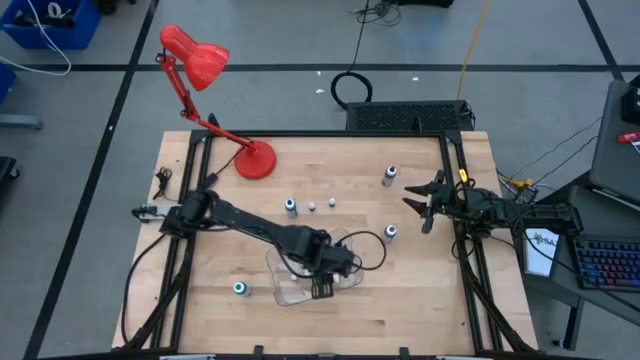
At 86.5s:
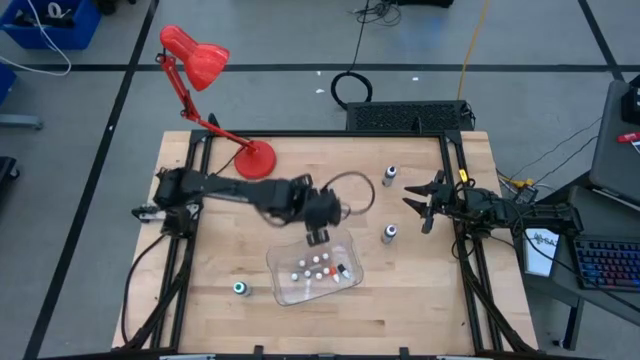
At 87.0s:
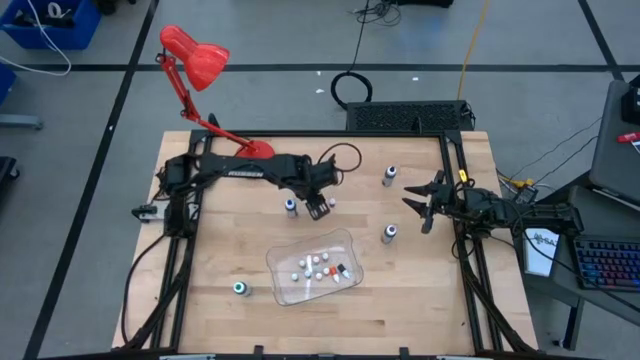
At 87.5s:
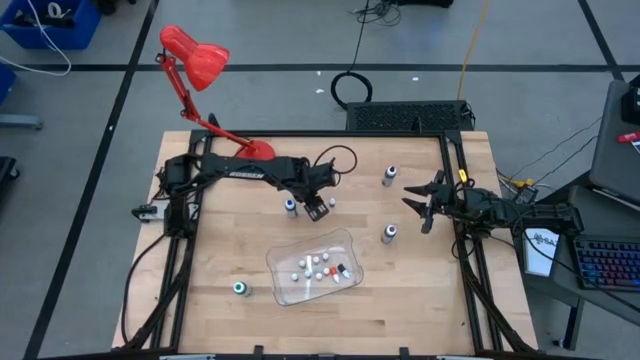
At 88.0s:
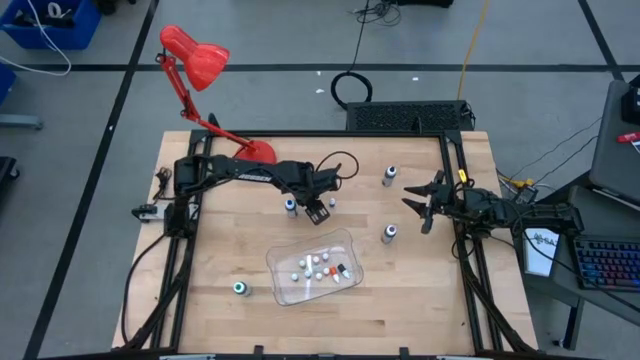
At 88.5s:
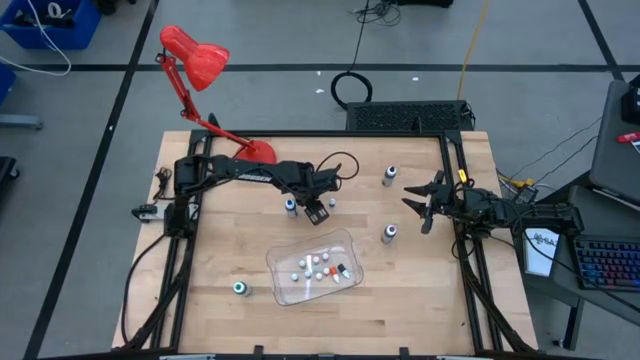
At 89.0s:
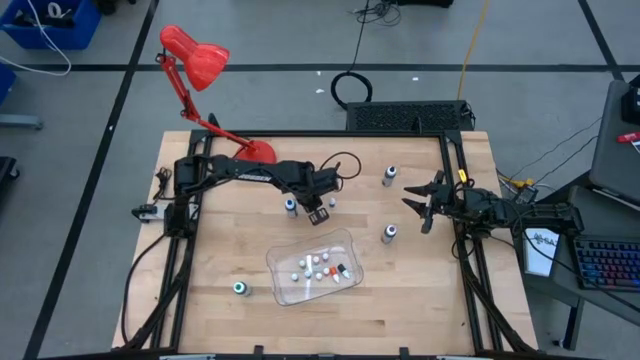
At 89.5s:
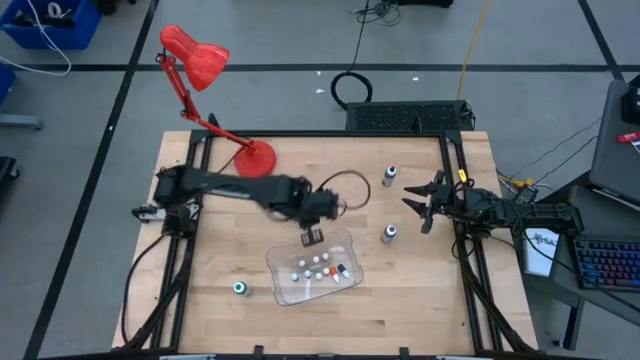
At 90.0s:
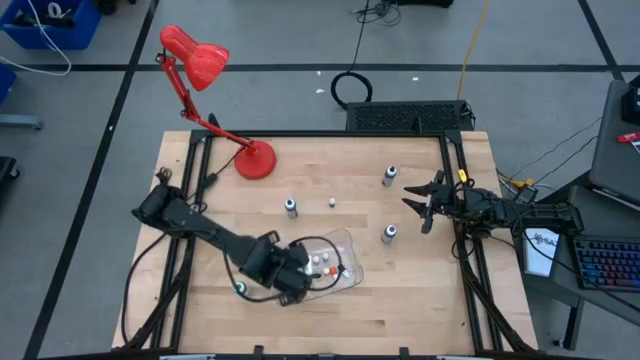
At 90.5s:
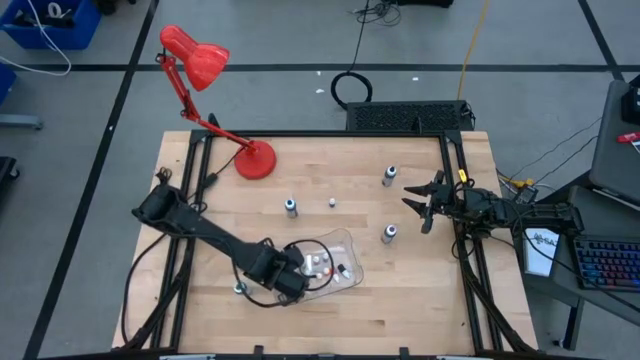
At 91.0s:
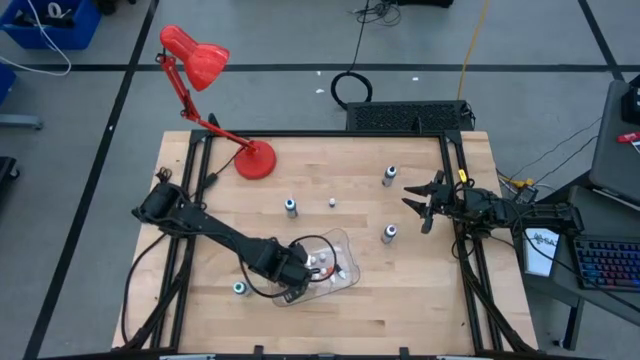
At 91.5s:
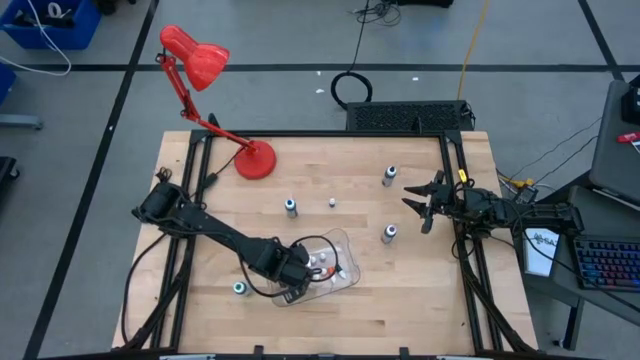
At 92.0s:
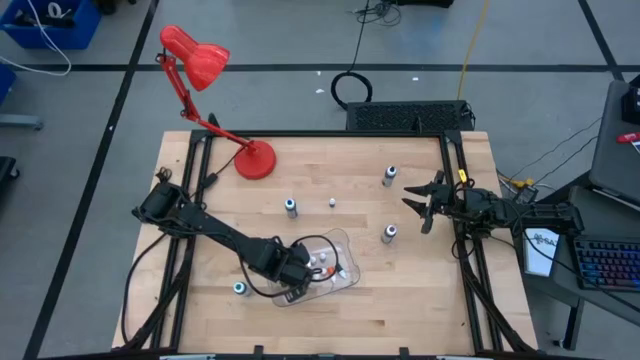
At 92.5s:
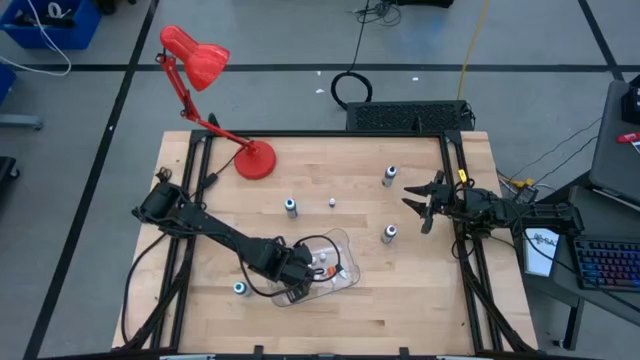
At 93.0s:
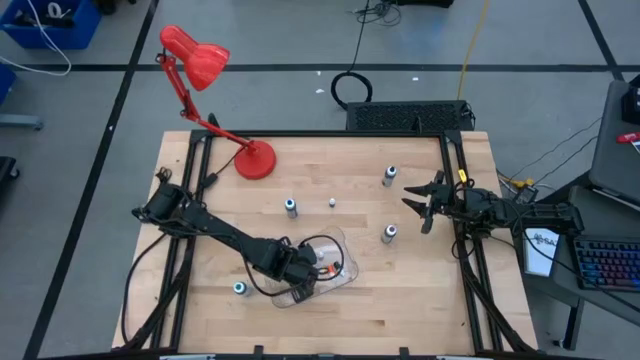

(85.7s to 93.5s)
Task: Pick & Place food coloring
Put the small purple food coloring into the bin

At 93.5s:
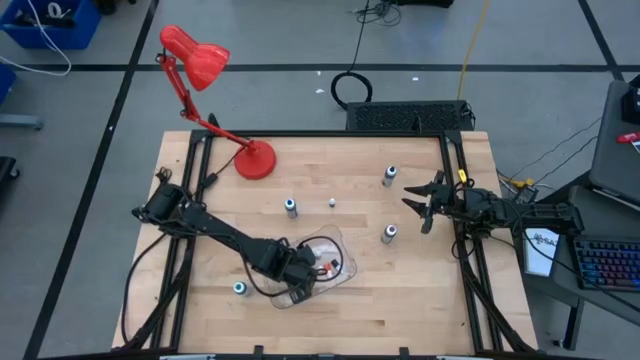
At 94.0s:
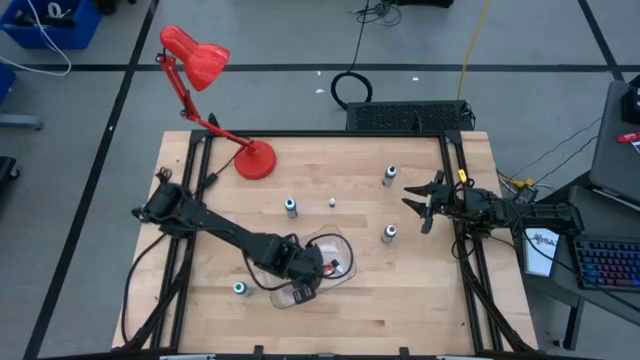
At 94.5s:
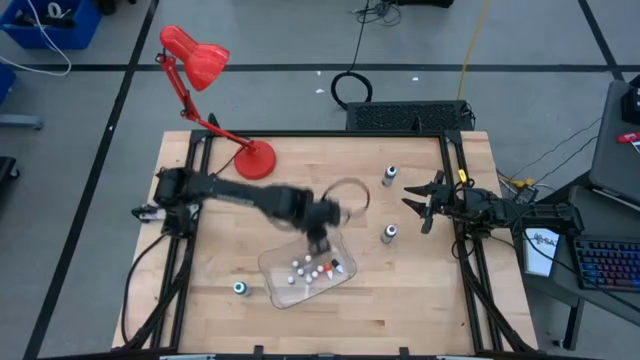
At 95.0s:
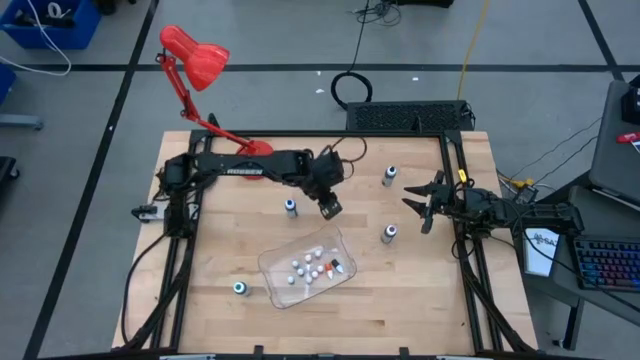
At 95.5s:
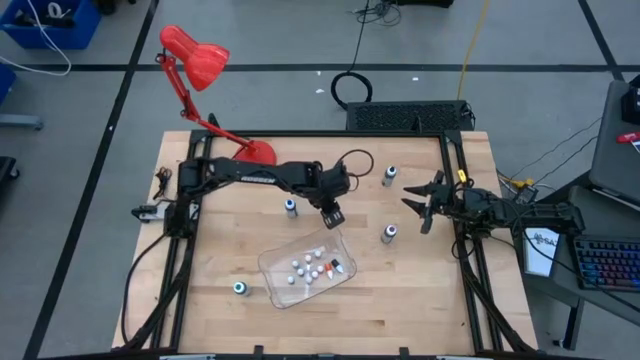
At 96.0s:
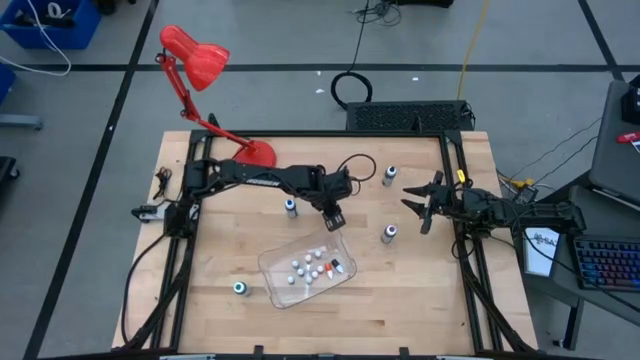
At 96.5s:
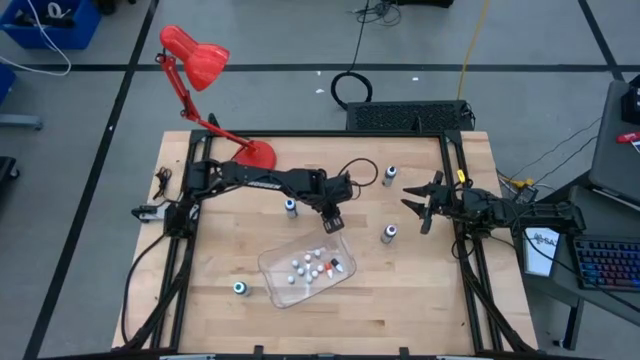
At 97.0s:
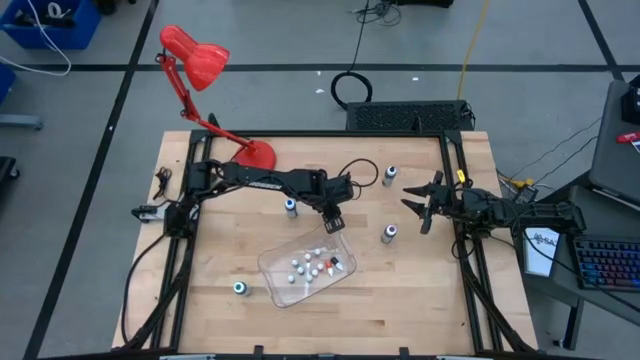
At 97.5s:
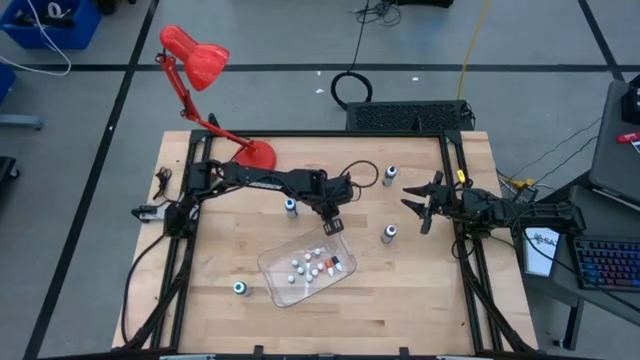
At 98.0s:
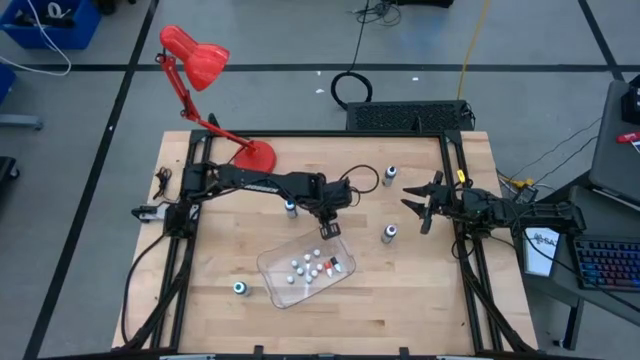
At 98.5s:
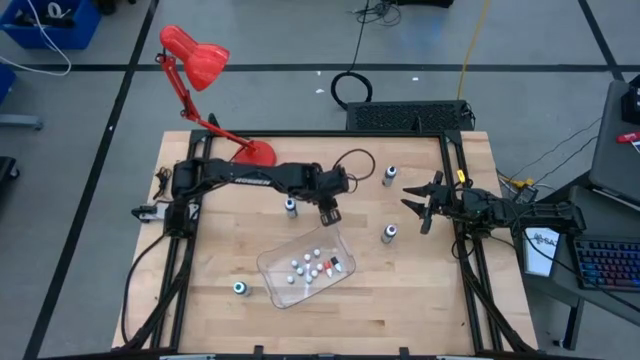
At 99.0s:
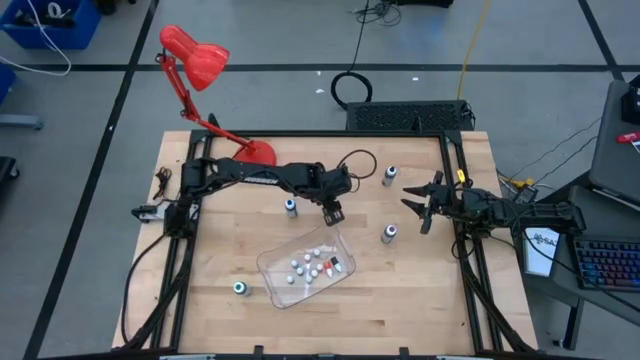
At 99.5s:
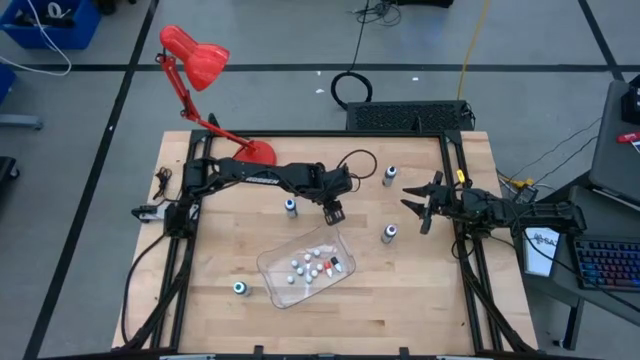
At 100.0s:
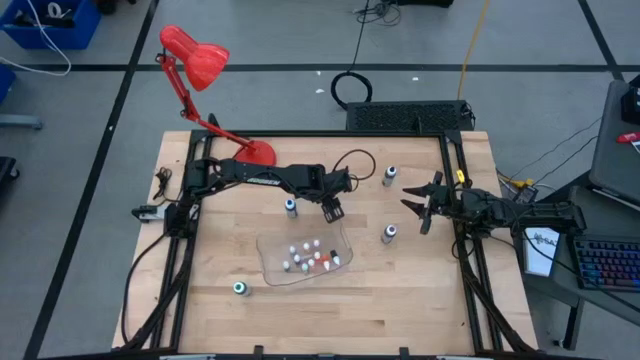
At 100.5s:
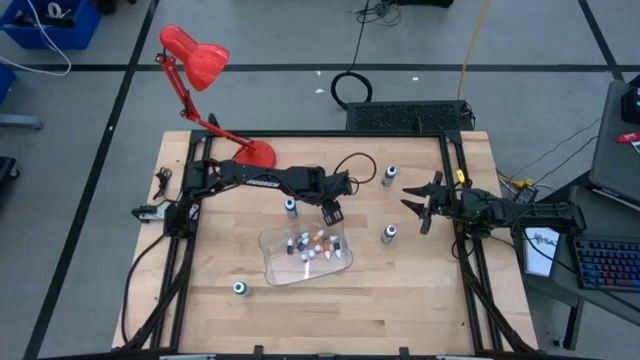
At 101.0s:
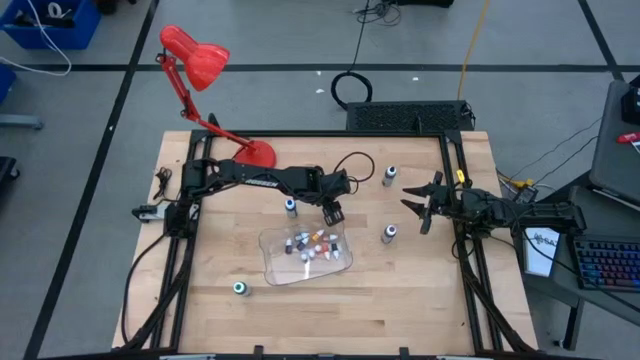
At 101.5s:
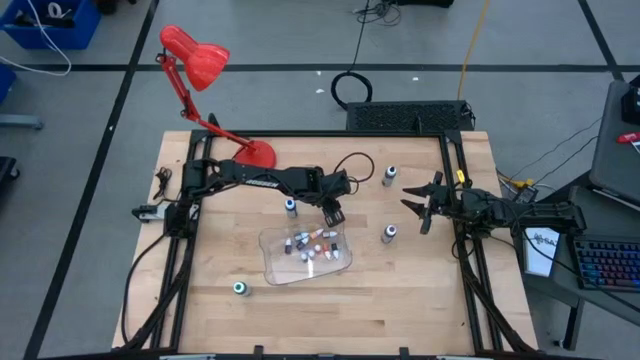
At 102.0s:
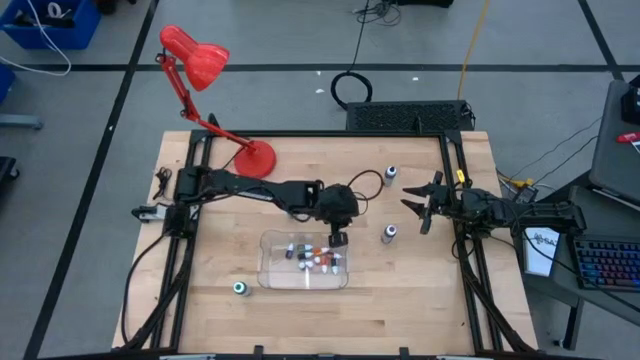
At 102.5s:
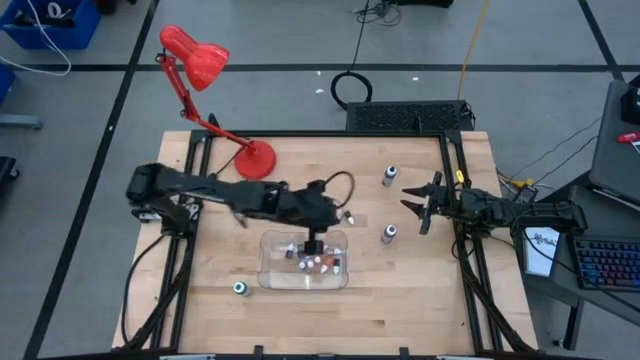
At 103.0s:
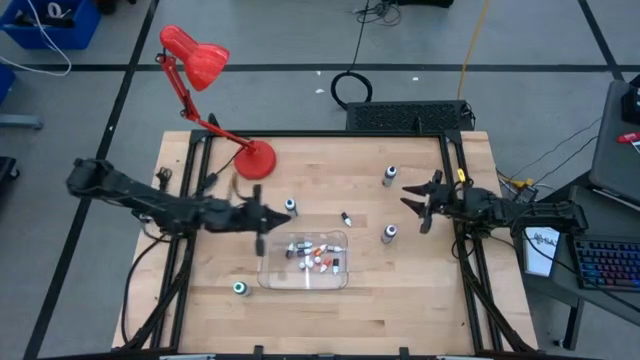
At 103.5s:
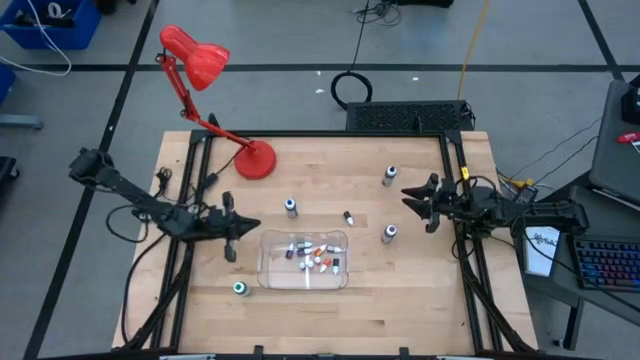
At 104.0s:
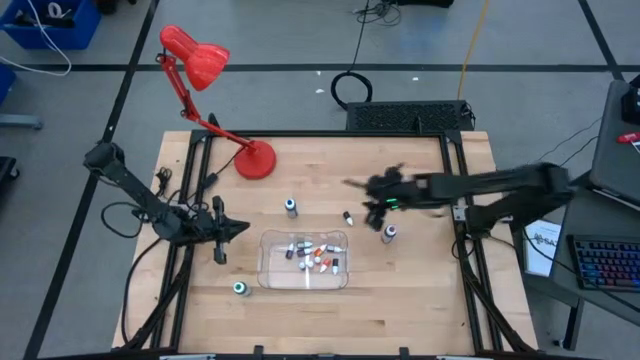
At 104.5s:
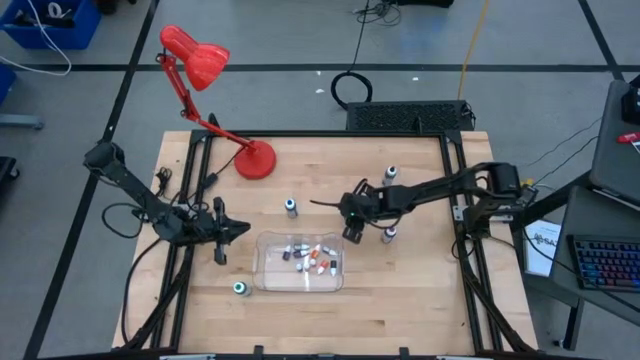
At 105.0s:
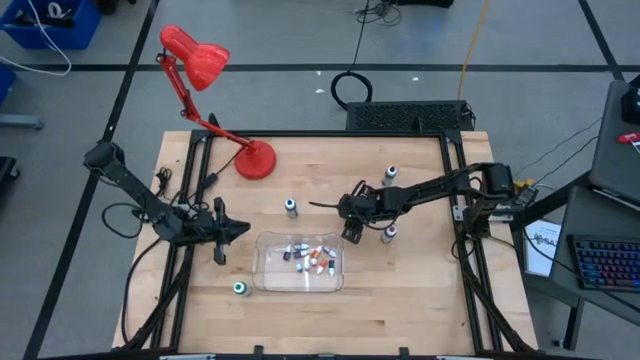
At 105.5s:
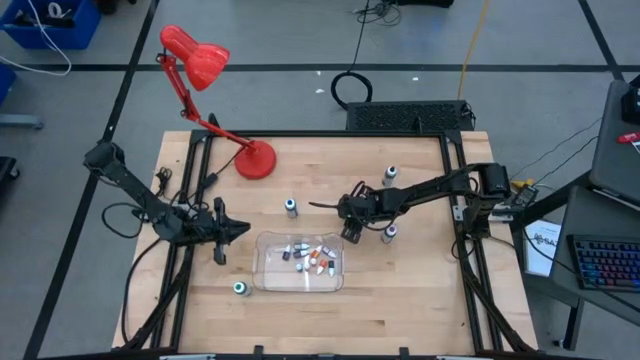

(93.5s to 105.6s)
Put the small black food coloring into the bin

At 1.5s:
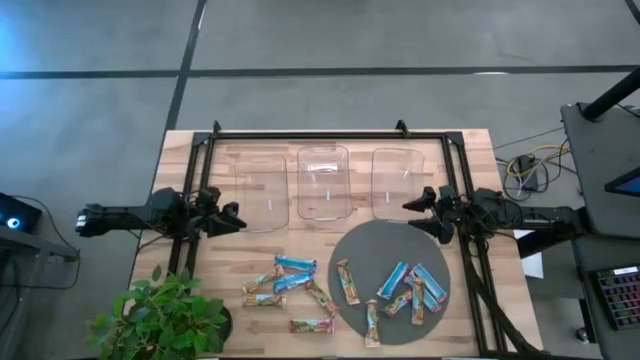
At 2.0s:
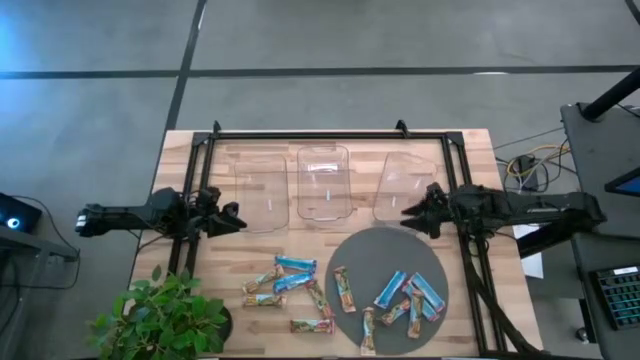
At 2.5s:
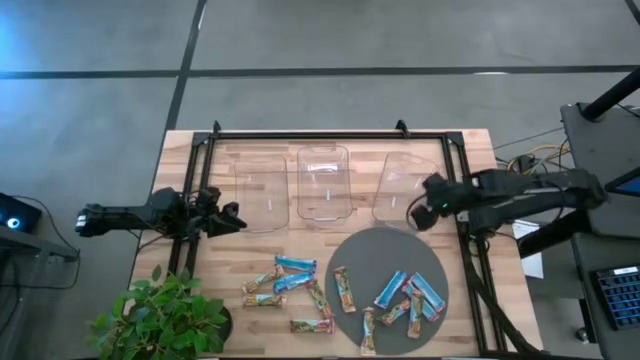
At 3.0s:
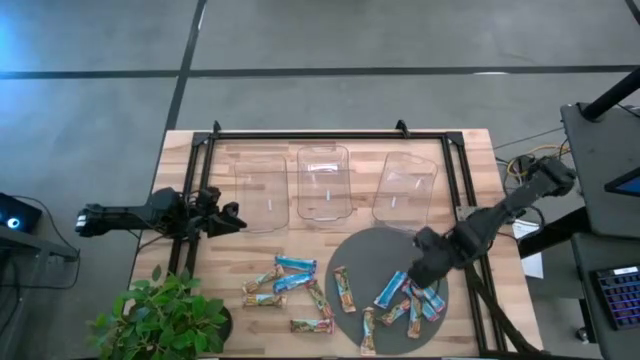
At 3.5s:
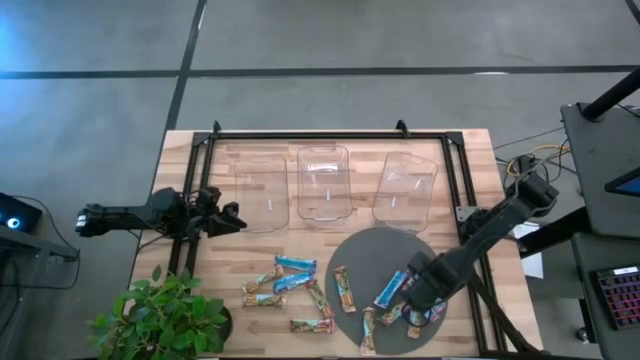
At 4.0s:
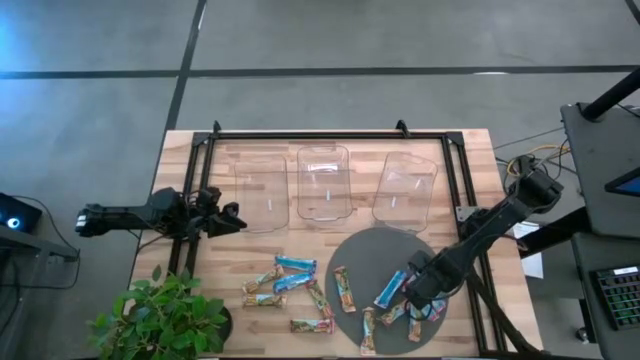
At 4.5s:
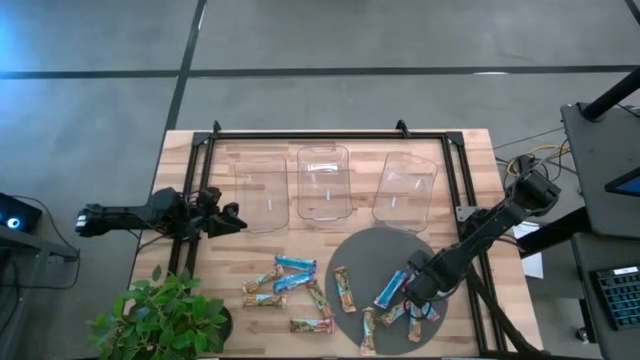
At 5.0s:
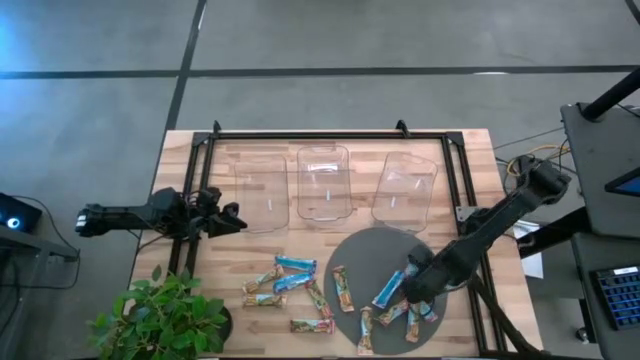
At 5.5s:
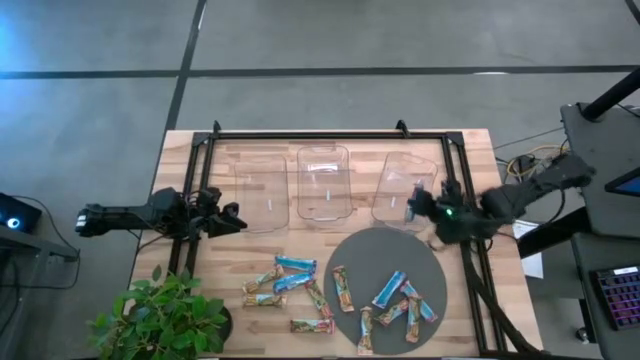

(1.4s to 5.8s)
Task: Pick and place Granola Bars by type
Put the red granola bar into the right transparent bin
